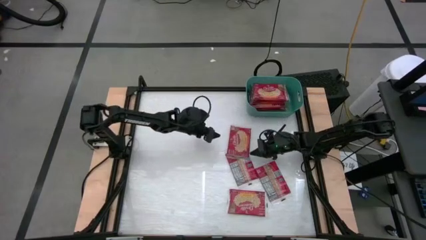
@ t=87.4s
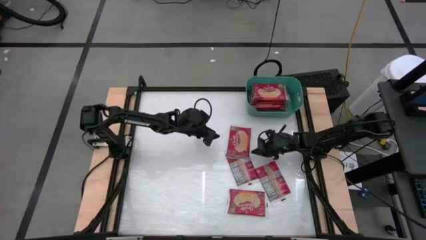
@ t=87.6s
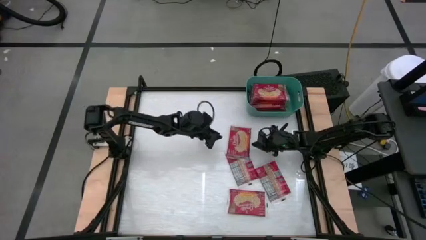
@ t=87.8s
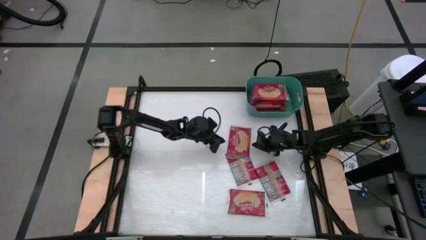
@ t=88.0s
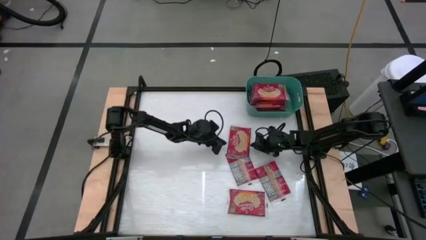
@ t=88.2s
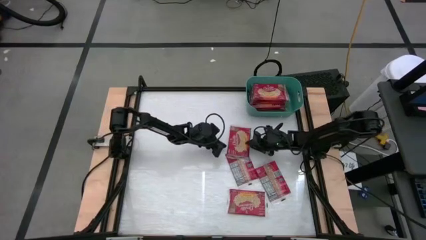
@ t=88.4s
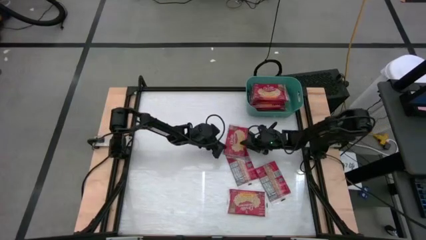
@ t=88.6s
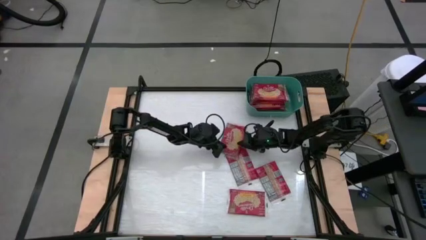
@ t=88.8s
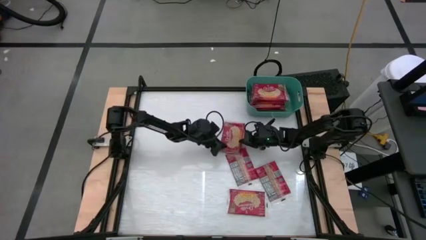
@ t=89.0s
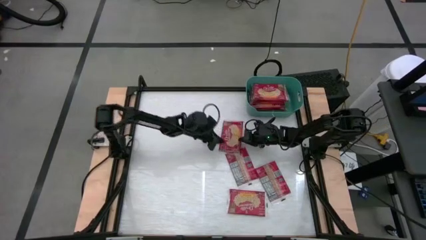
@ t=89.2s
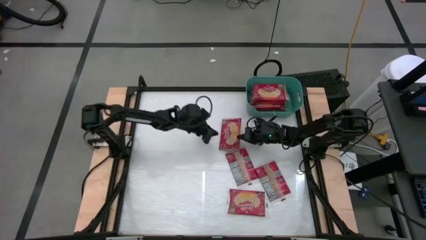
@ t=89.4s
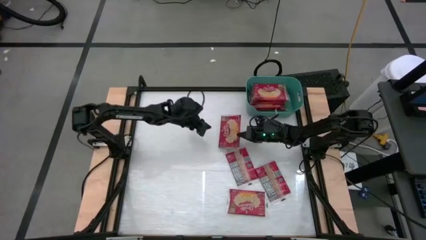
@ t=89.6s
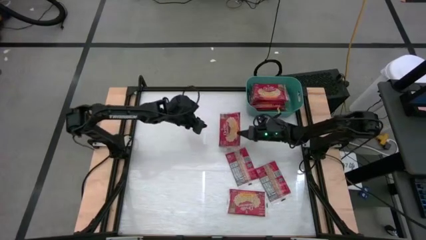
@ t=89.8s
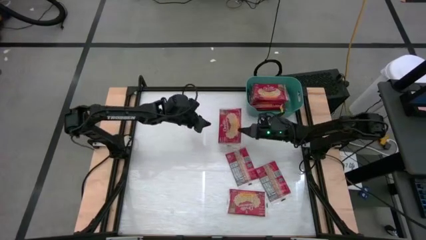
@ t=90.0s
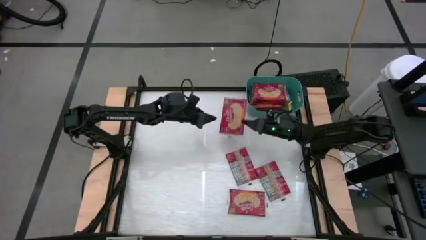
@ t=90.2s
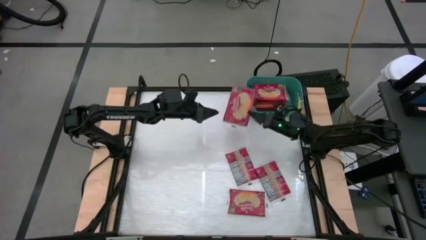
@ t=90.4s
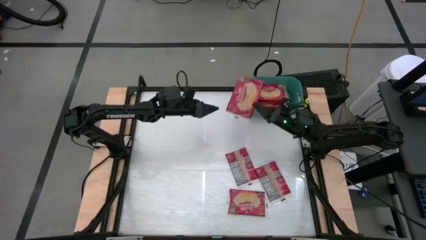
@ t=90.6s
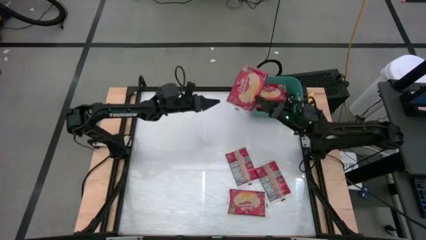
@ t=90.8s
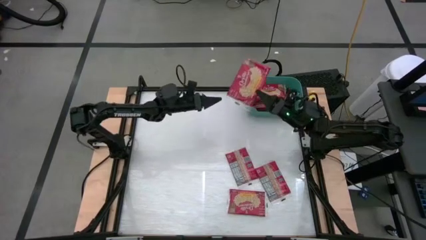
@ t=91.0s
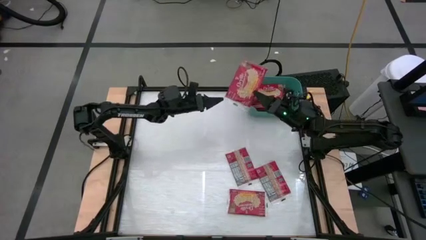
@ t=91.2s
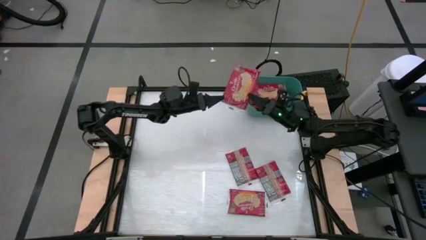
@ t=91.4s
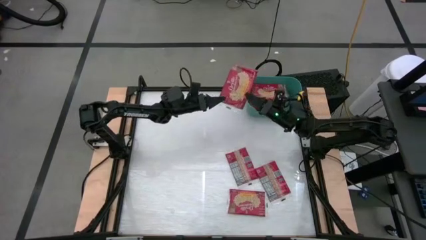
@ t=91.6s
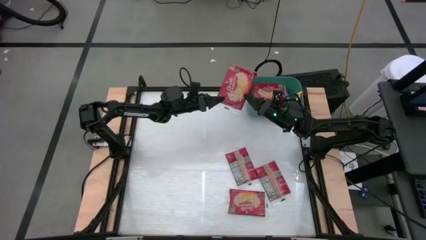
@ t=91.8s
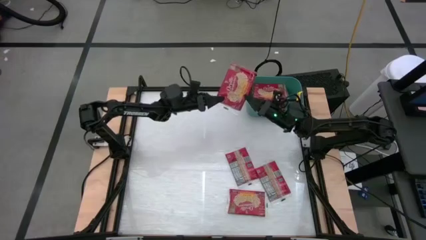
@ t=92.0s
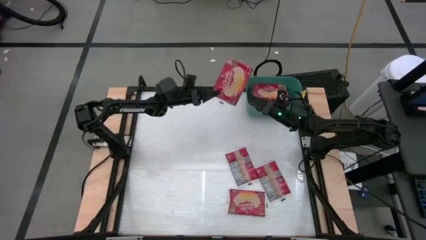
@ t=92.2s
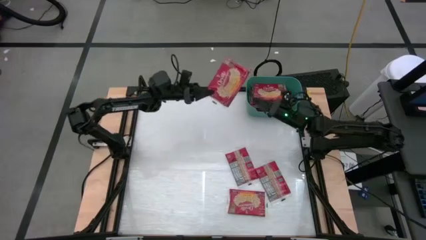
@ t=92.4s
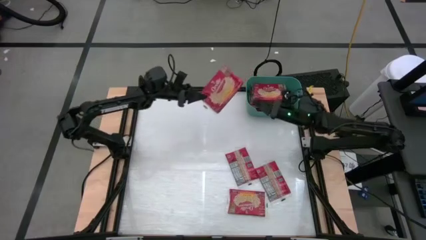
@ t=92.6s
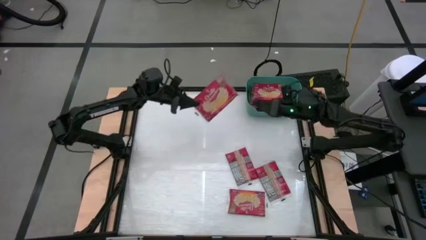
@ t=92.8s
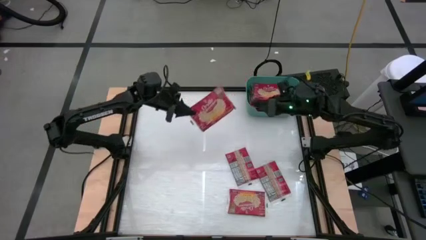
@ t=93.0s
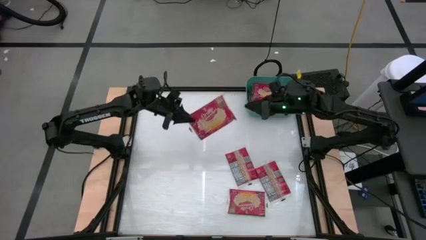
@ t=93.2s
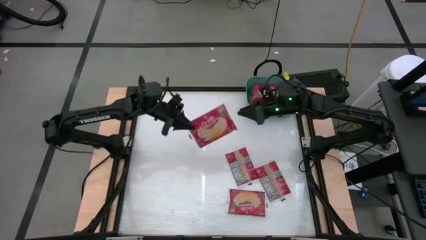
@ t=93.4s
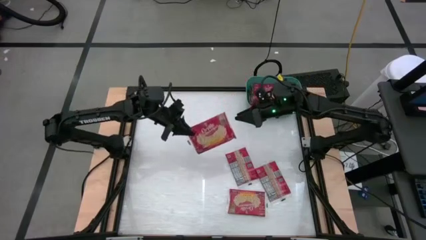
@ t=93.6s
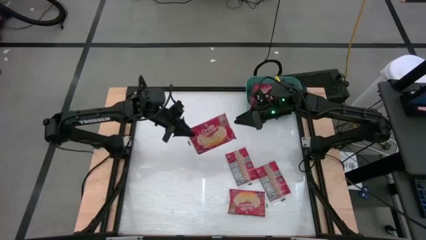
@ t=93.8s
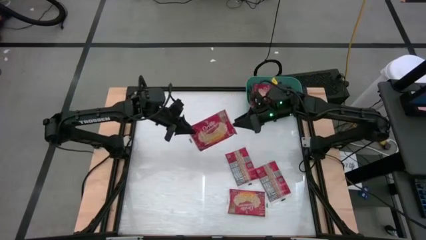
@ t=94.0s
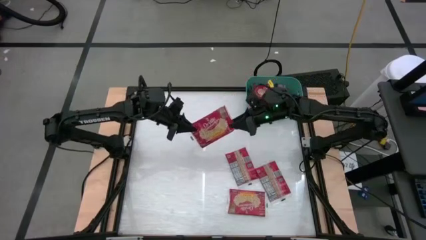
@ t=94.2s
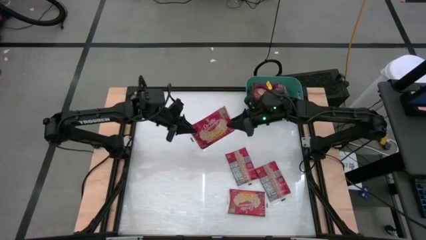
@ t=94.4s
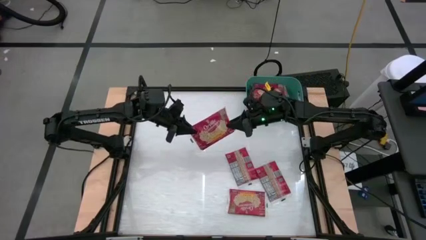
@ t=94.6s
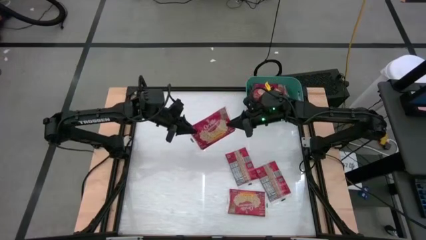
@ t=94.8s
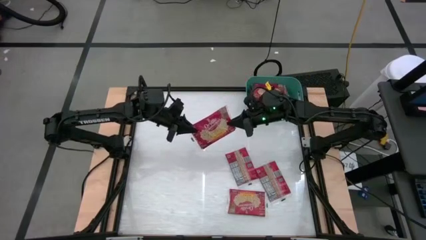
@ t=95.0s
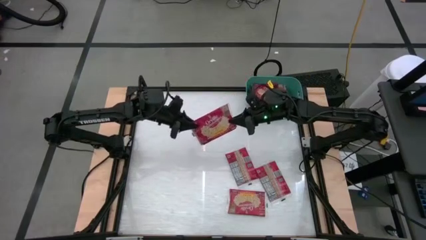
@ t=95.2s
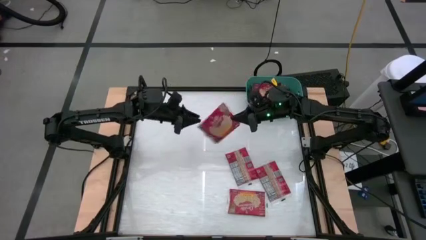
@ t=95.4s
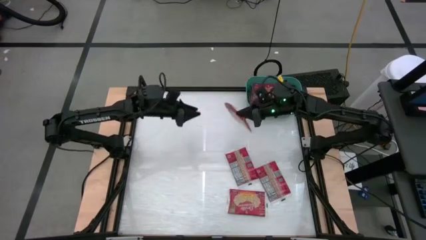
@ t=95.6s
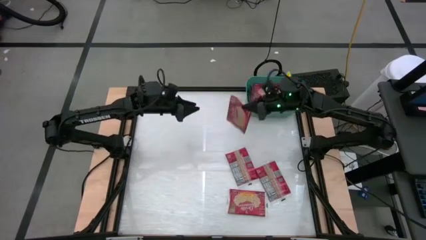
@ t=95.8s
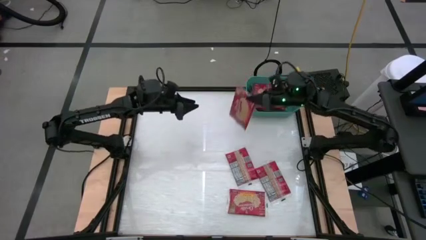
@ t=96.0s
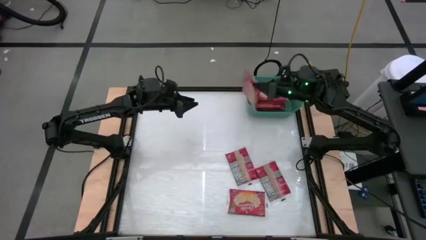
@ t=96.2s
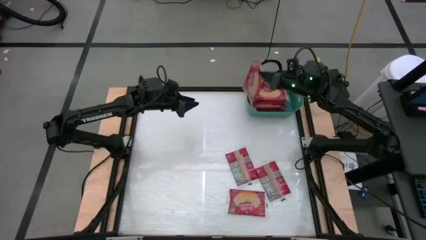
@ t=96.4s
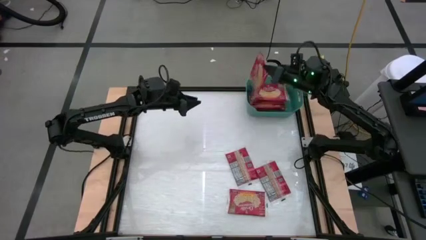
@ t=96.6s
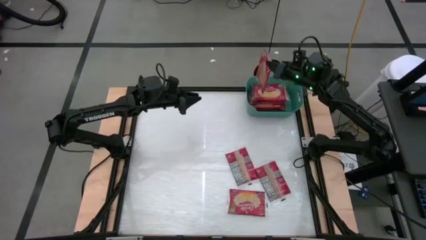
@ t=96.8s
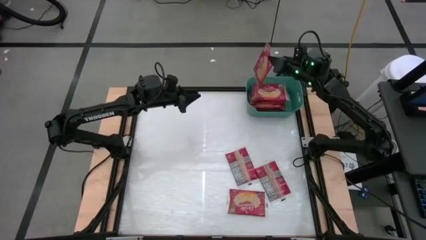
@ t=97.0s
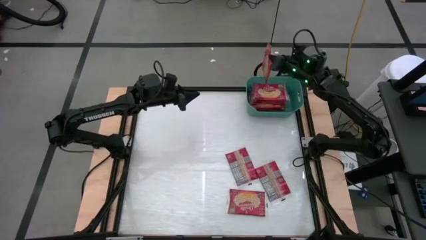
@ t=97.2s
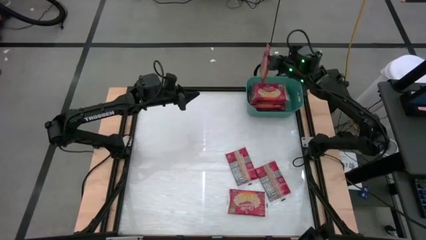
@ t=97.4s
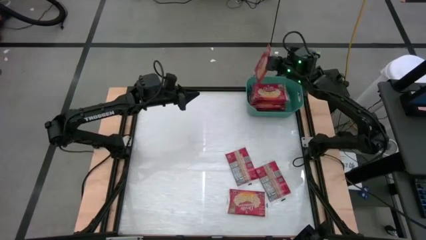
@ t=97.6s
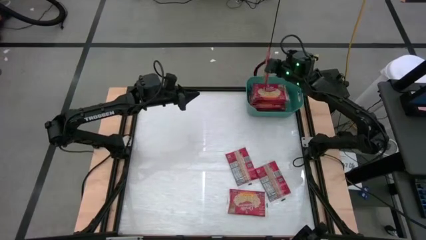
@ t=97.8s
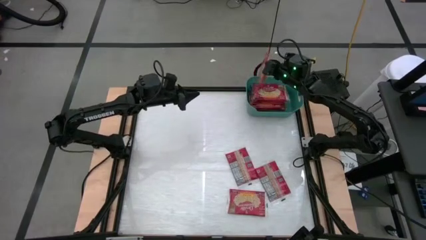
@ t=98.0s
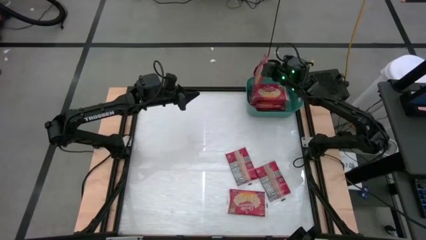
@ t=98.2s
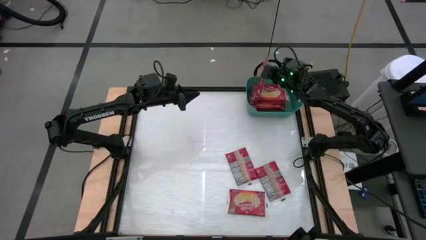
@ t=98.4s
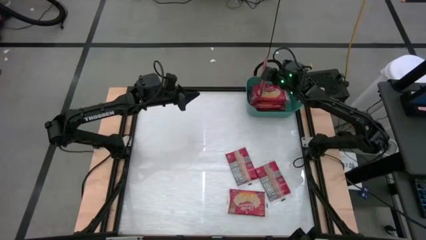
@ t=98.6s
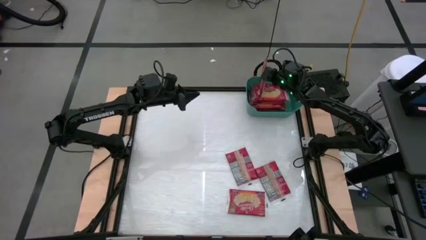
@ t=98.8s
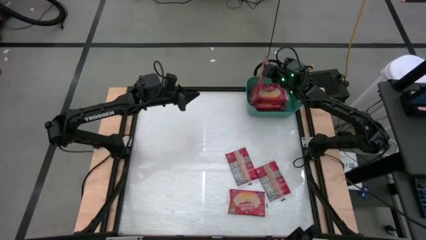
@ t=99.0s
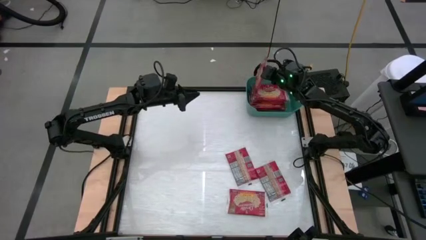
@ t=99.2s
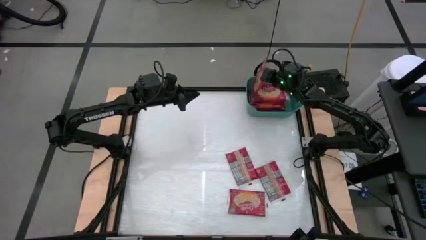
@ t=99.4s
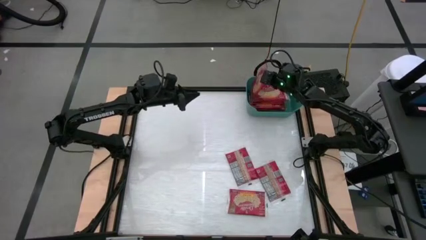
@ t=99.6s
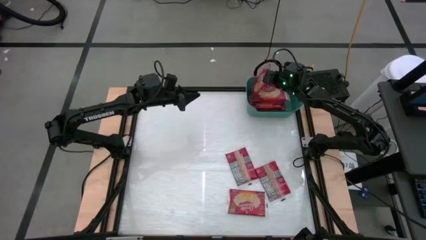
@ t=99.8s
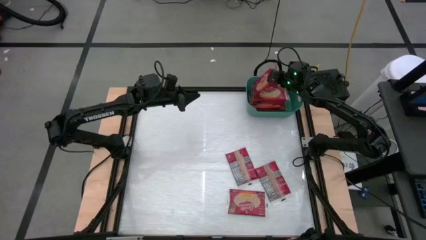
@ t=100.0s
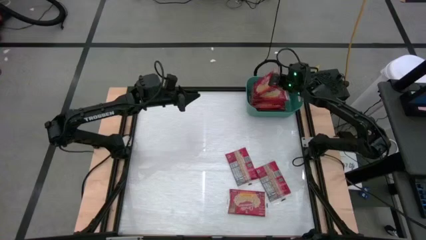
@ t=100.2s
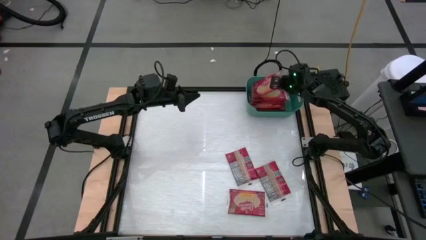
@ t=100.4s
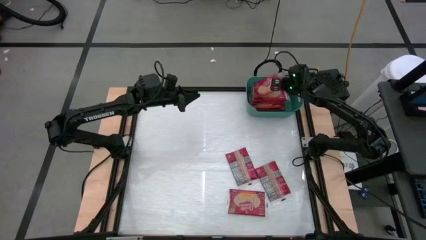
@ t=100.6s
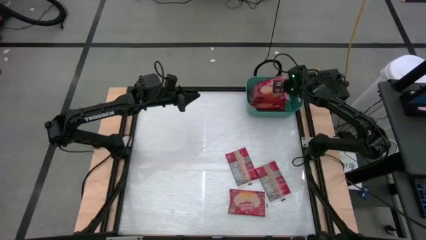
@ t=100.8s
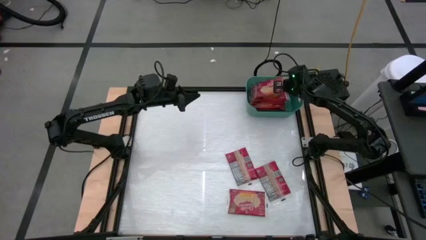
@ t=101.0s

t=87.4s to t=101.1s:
Task: Sort popcorn bags into baskets
Put the red popcorn bag into the green bin
